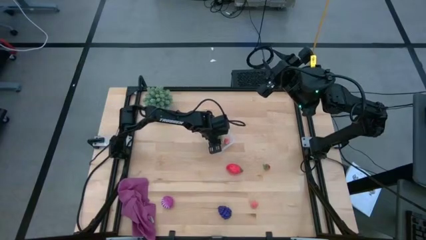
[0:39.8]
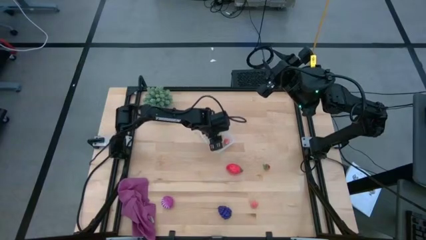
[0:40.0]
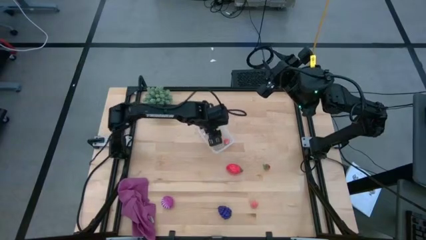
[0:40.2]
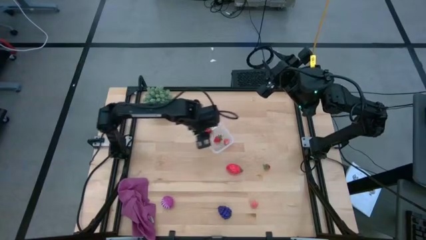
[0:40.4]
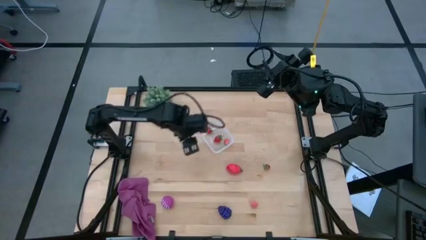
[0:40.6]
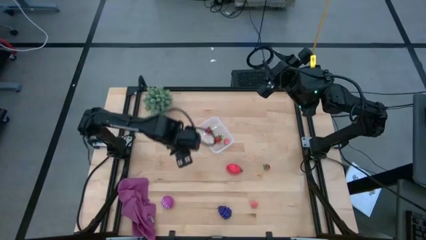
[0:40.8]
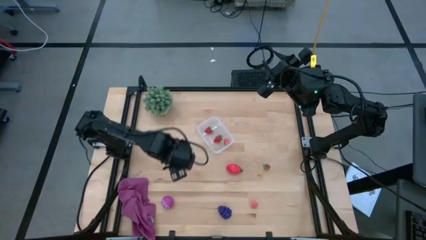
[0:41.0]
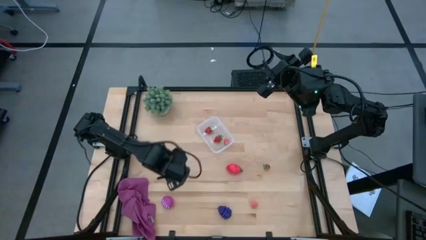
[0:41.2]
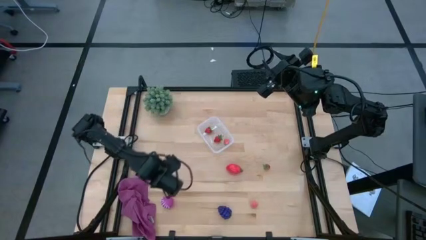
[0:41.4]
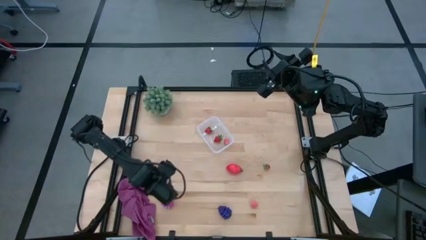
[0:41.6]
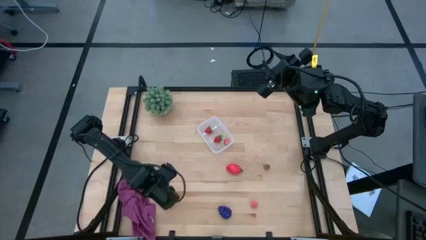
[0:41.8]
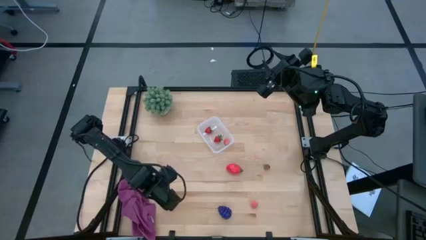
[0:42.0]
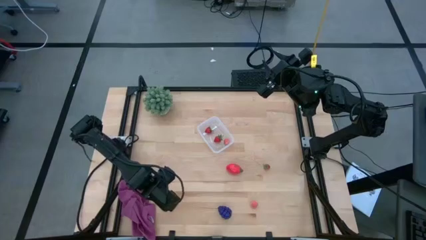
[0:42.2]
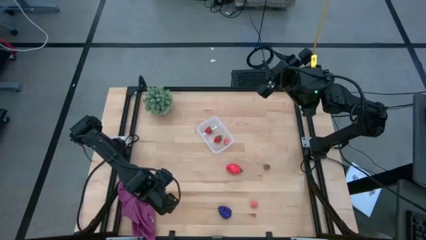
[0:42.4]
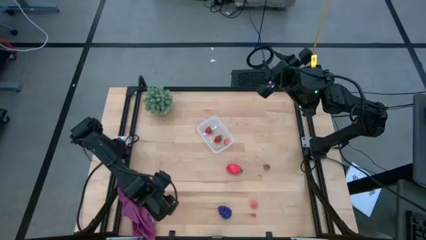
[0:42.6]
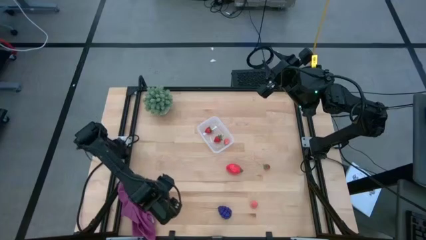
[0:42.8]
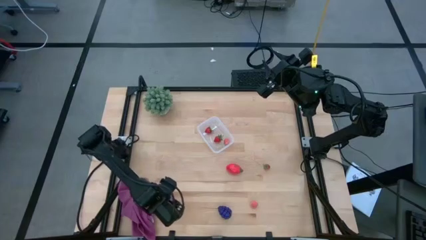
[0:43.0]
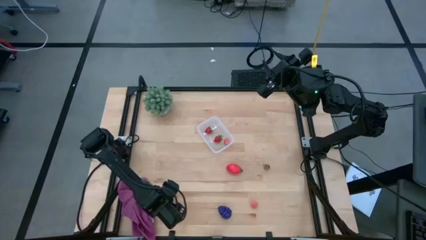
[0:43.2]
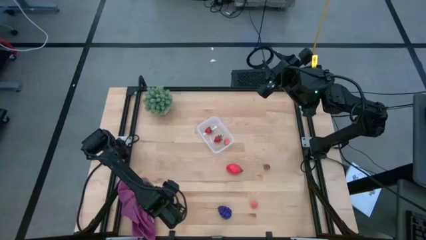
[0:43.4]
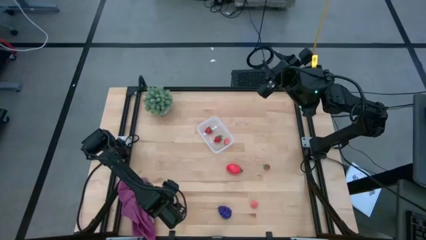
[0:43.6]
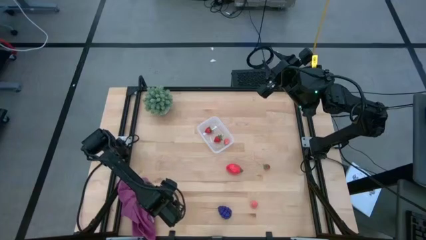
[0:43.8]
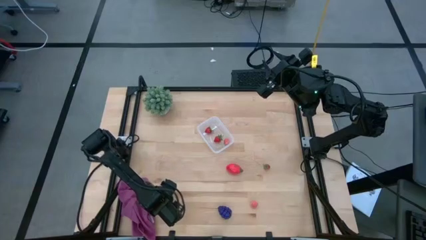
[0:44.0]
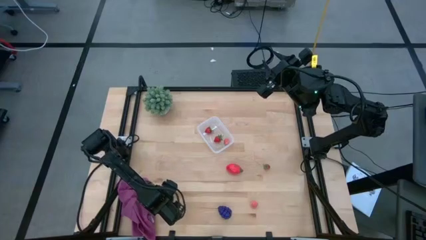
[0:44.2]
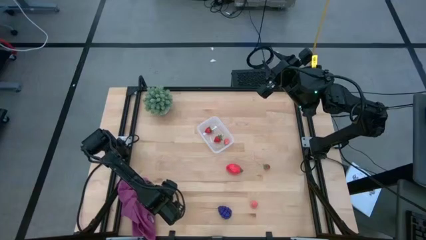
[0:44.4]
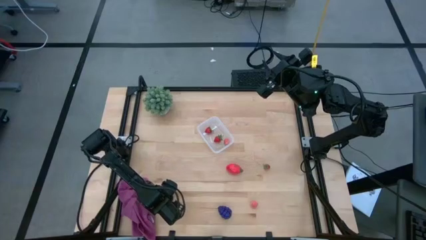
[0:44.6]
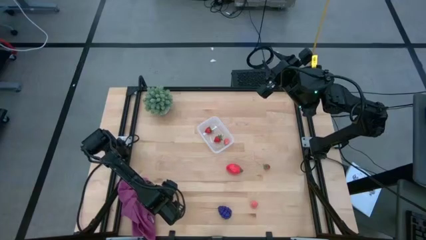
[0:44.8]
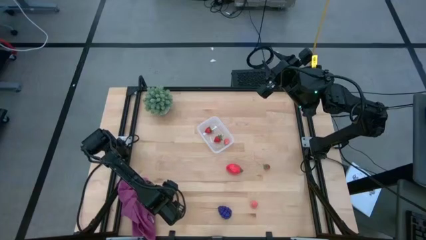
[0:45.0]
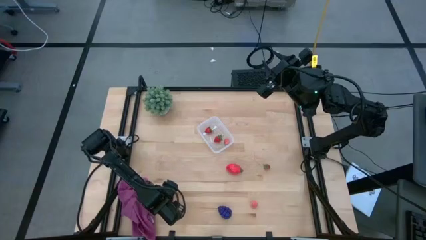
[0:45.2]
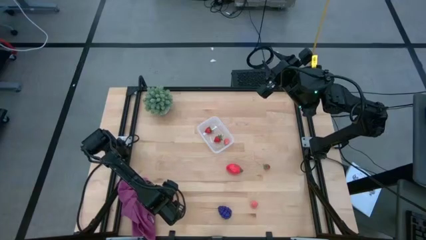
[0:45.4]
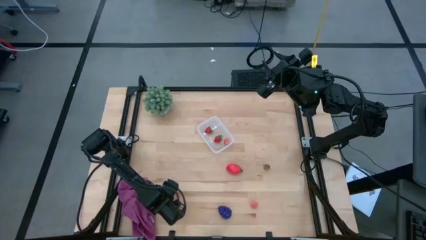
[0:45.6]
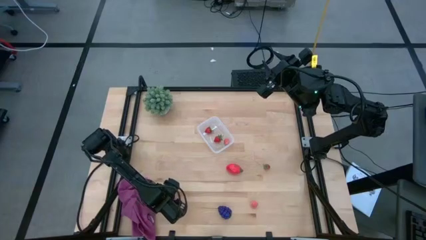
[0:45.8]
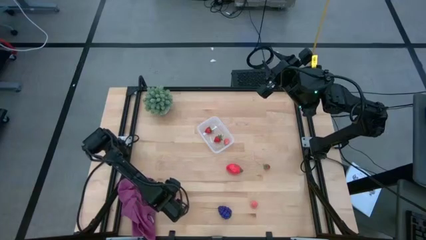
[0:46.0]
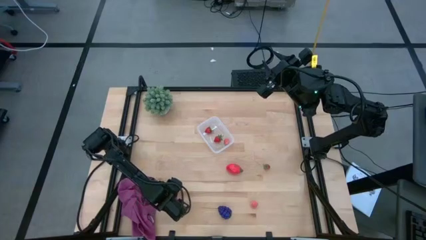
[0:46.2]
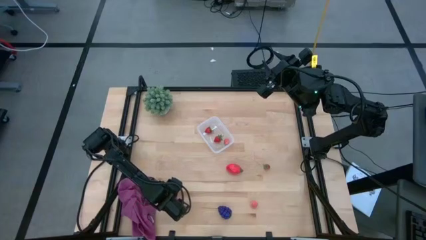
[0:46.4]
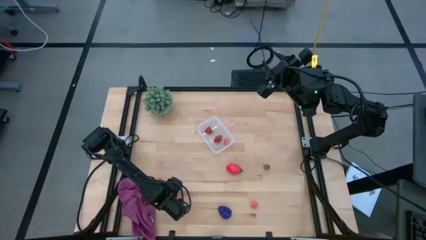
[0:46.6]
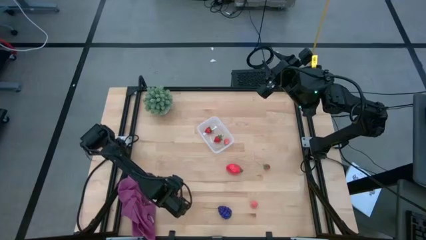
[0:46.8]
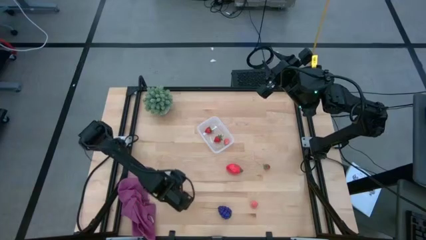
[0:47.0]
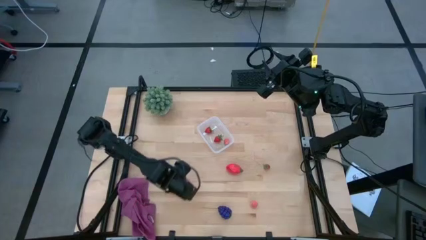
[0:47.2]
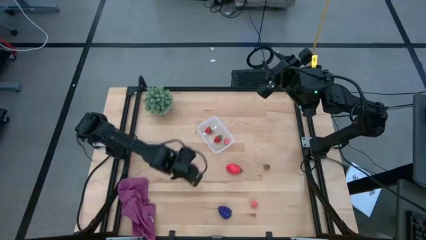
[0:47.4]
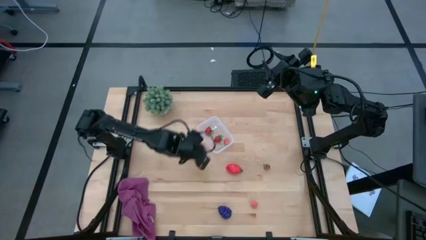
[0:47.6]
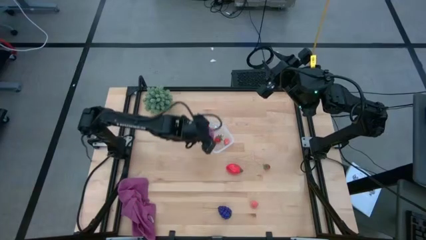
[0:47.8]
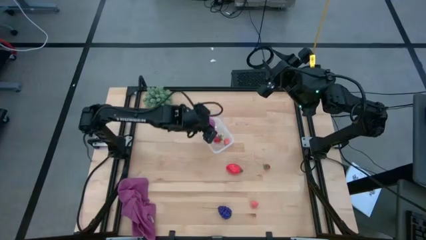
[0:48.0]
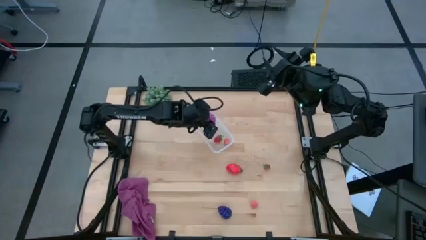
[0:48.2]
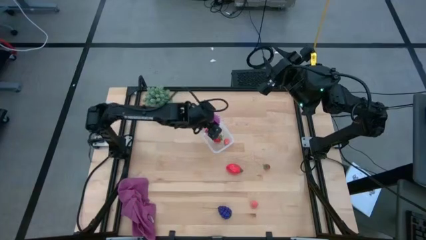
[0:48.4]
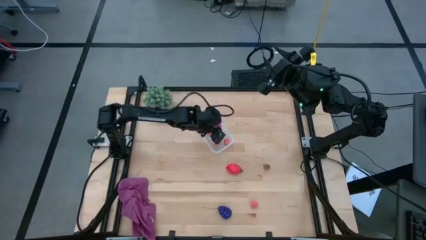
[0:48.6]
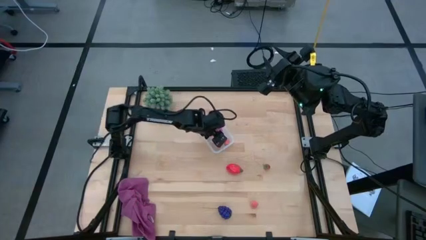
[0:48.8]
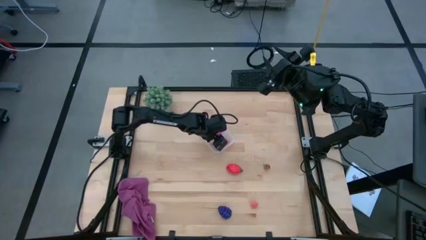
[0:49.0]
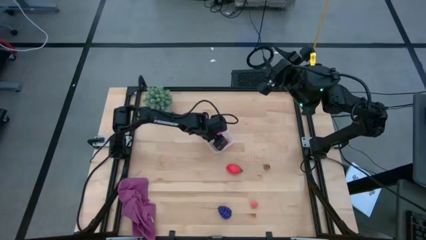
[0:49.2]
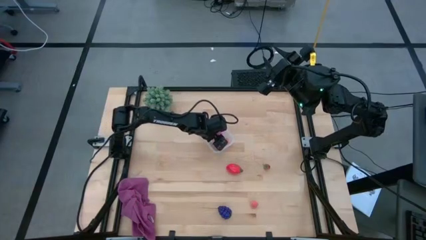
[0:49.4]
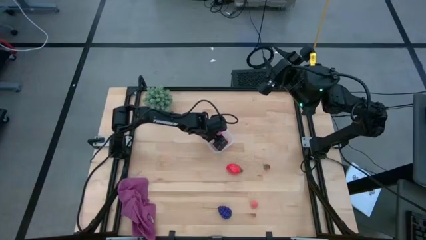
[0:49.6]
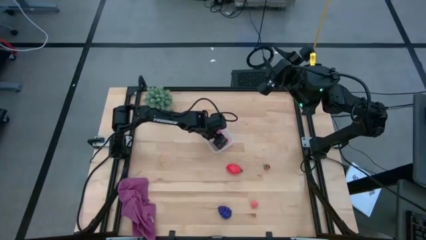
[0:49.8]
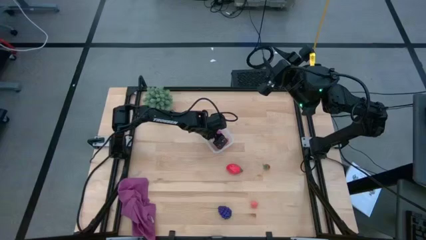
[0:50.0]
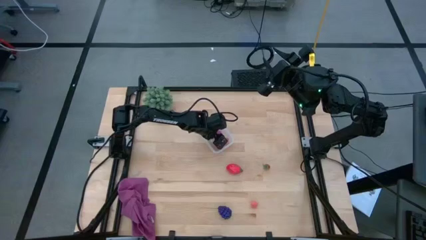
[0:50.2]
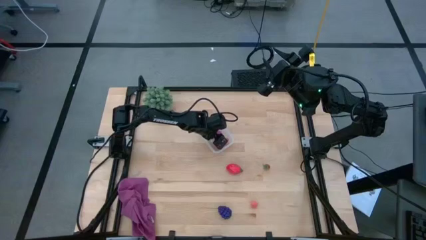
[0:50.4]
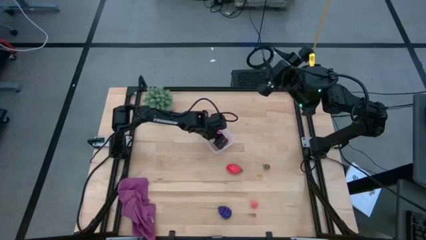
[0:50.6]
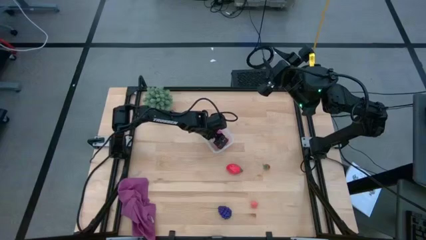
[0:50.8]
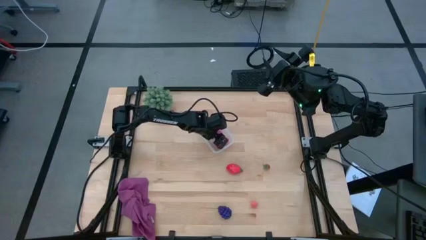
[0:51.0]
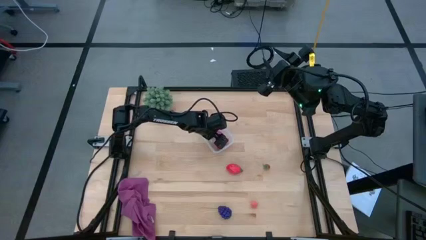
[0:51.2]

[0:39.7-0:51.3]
Task: Pick and placing Produce into tupperware
Put the onion into the transparent bin

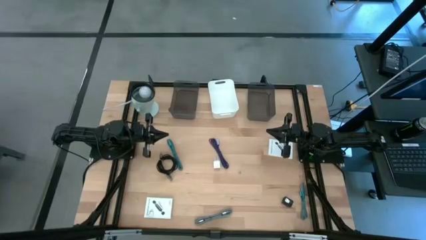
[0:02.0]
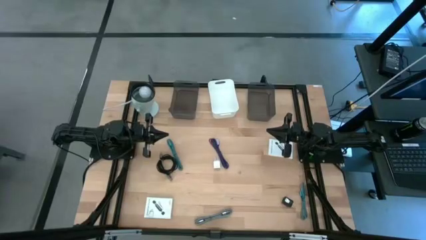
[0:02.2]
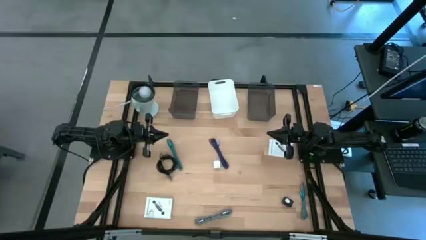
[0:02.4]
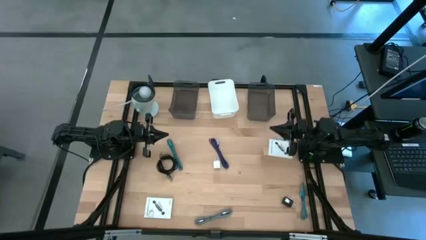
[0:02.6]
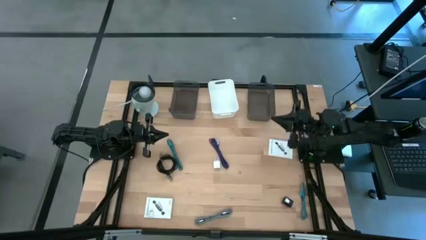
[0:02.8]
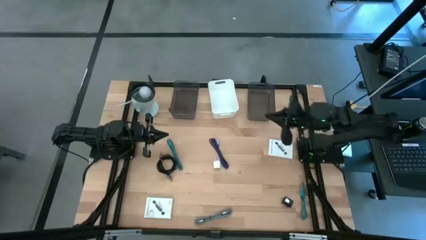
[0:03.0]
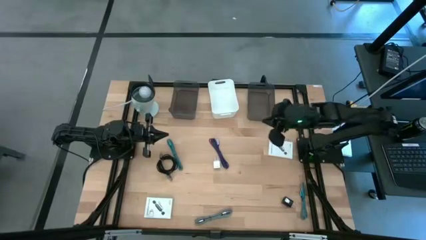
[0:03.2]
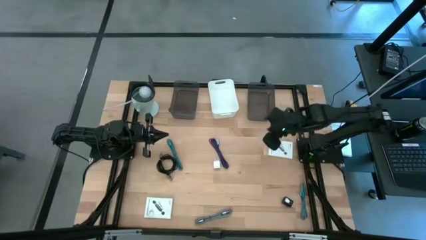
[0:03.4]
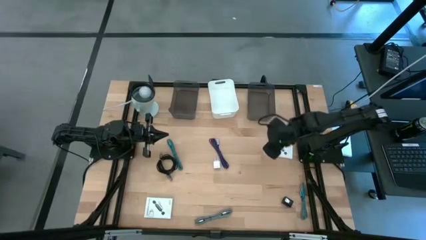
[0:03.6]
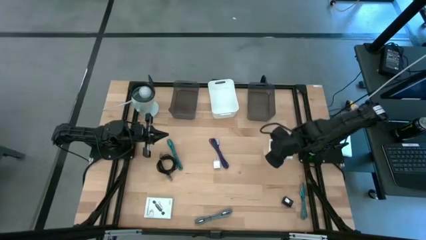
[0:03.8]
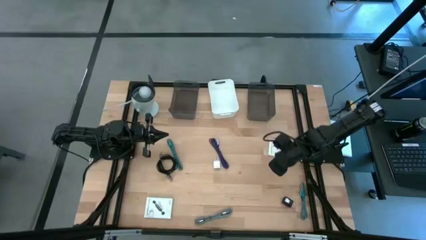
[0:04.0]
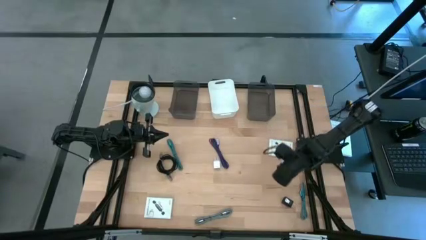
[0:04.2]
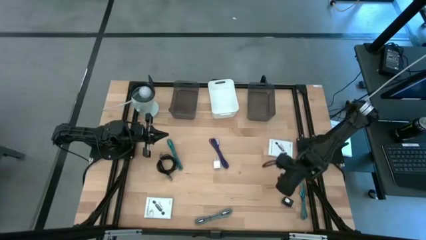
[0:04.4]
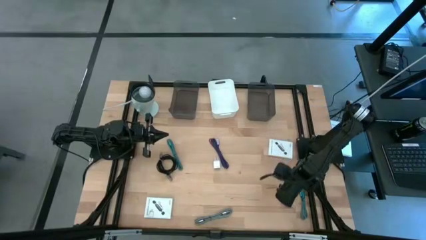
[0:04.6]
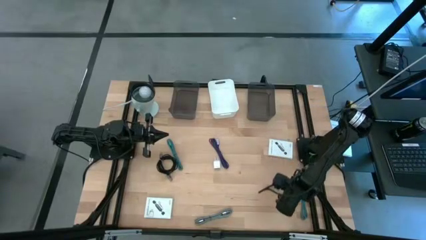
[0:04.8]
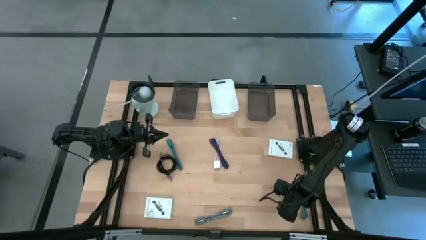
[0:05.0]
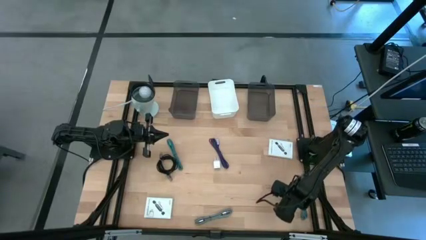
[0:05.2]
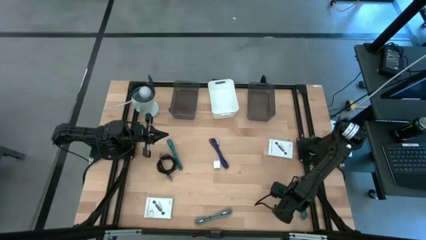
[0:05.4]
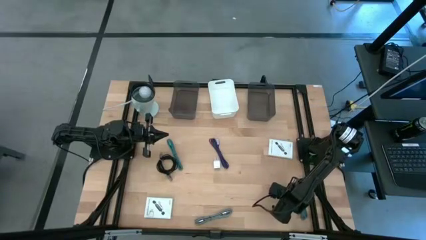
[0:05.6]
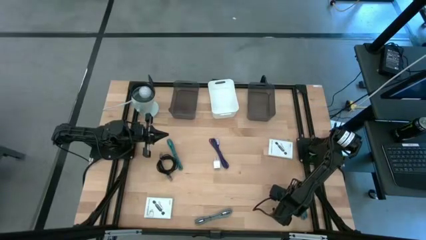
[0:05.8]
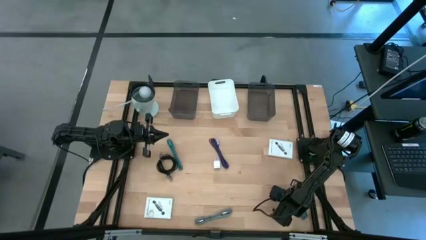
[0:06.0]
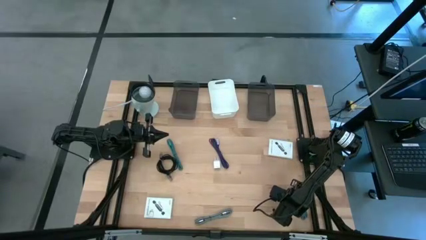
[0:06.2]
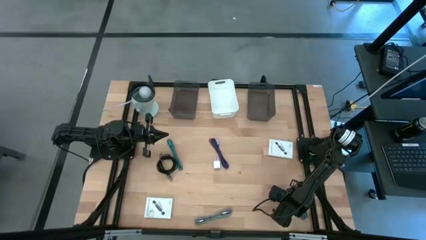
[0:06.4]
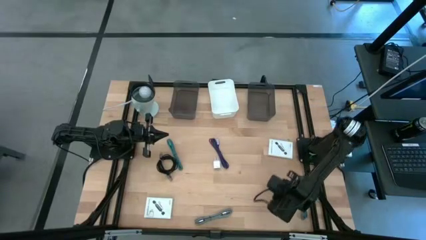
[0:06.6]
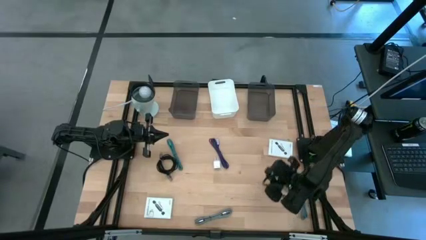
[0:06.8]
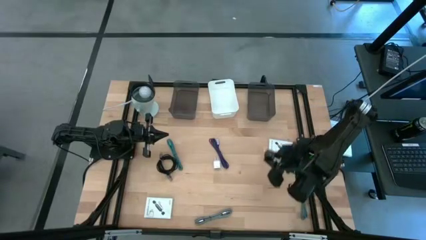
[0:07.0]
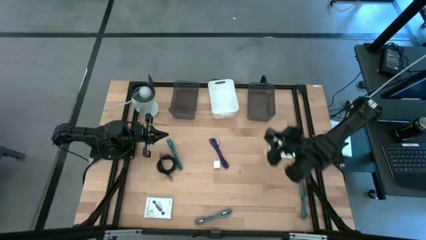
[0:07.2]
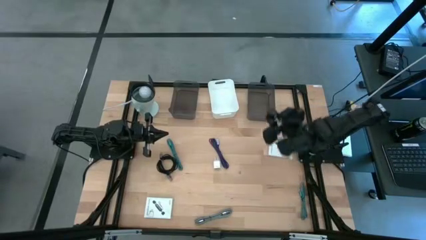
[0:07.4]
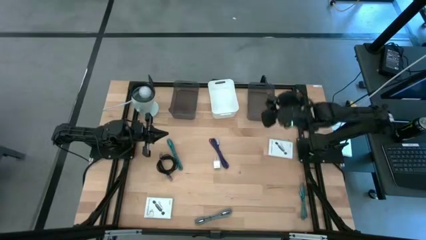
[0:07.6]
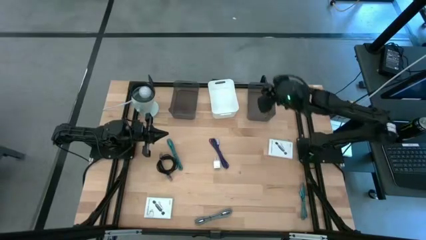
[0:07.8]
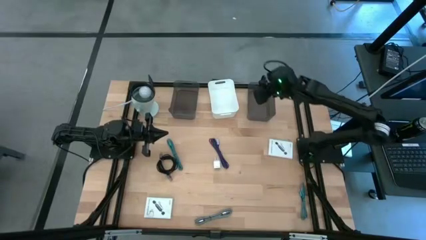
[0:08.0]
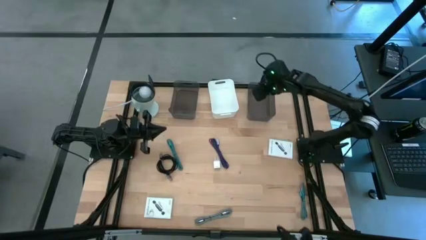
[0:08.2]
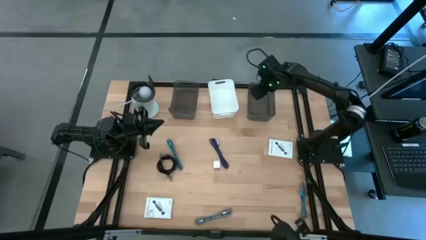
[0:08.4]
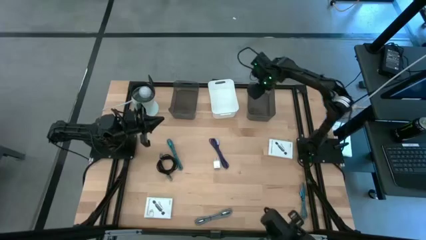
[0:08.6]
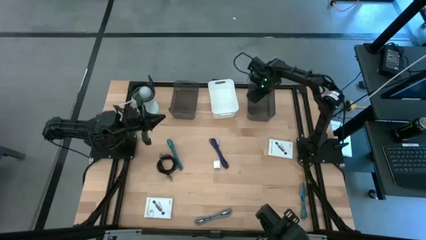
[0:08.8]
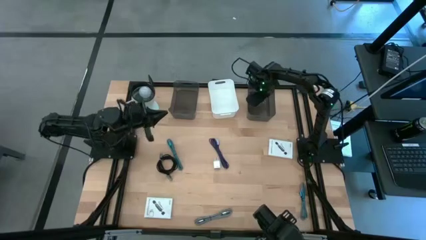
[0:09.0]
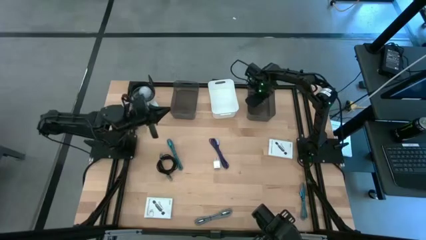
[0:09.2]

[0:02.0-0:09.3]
Task: Pick and place items into bin
Put the black charger adapter into the right black bin
